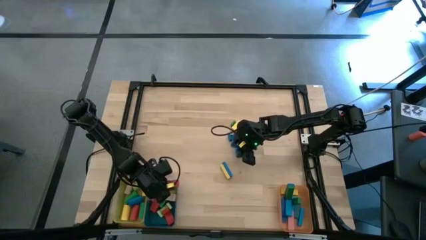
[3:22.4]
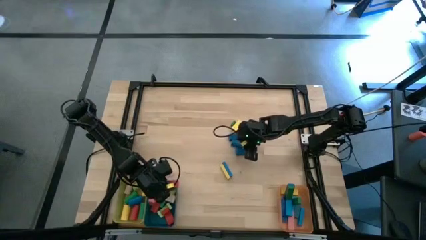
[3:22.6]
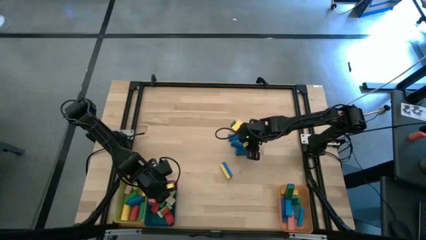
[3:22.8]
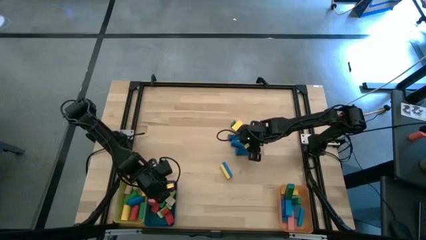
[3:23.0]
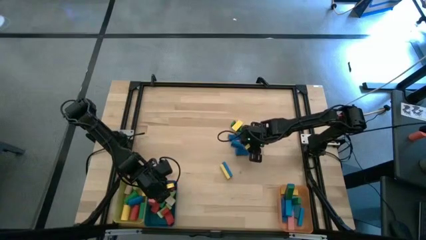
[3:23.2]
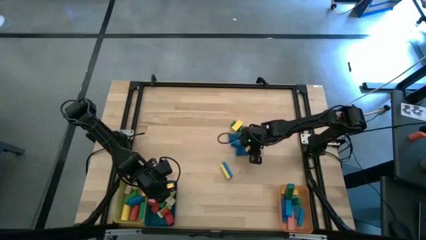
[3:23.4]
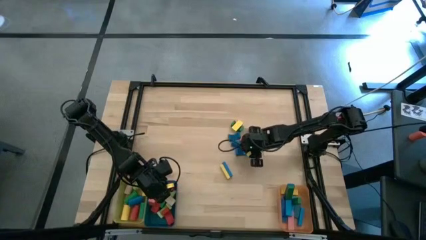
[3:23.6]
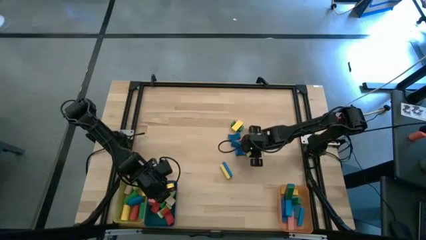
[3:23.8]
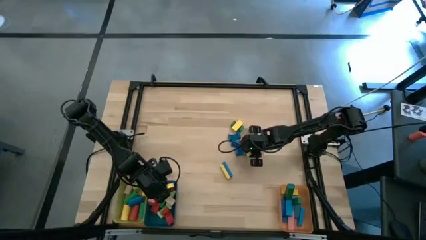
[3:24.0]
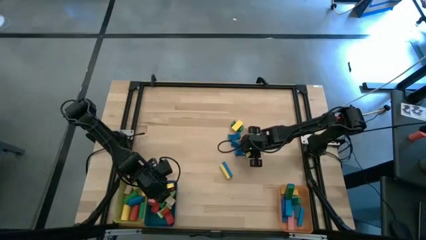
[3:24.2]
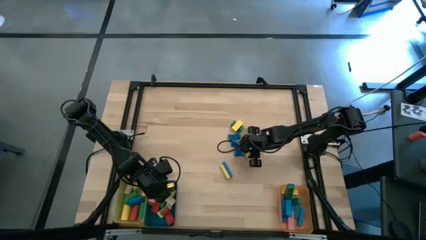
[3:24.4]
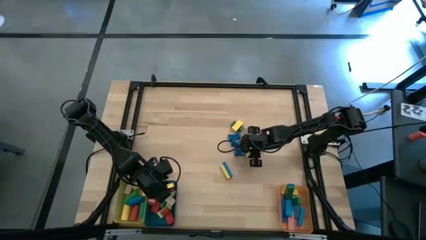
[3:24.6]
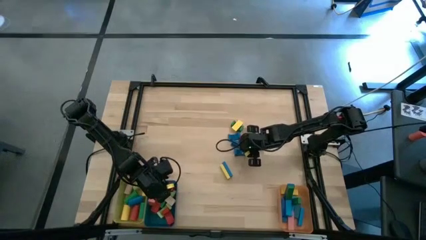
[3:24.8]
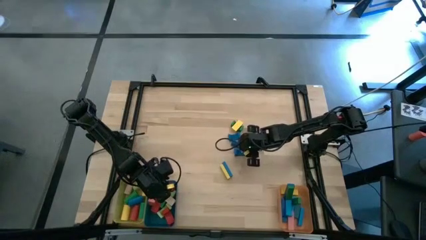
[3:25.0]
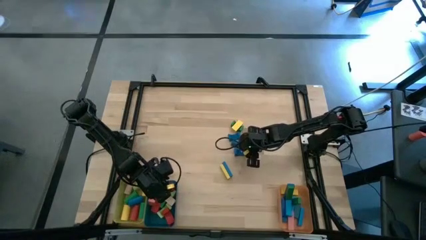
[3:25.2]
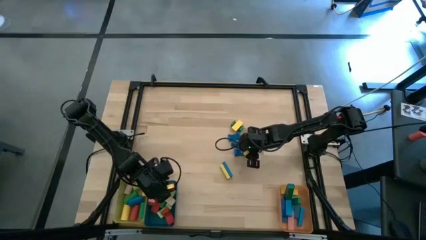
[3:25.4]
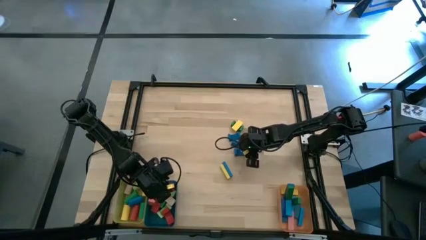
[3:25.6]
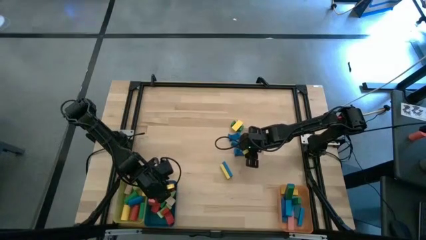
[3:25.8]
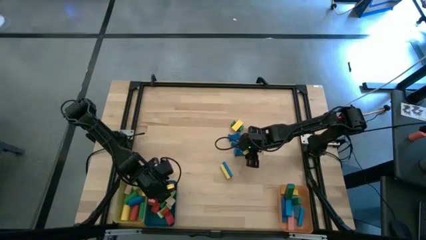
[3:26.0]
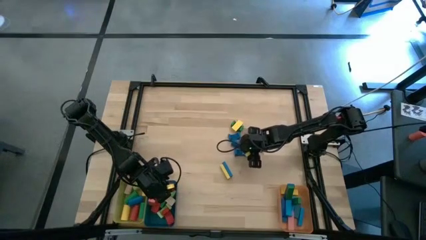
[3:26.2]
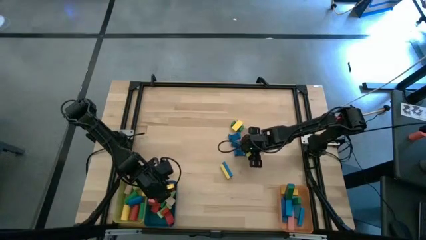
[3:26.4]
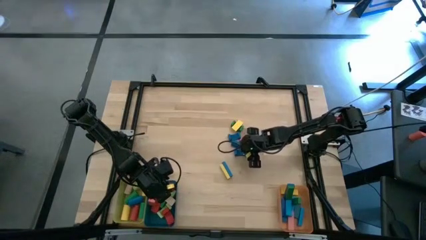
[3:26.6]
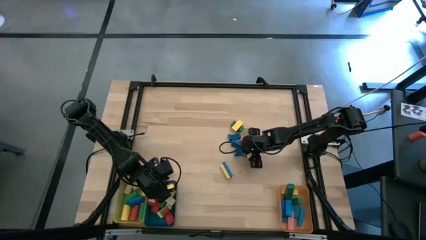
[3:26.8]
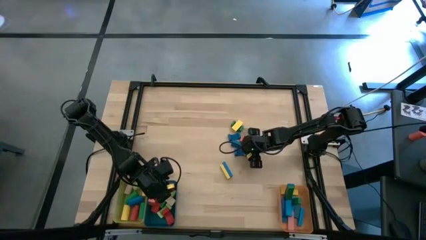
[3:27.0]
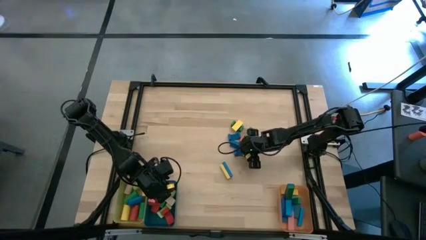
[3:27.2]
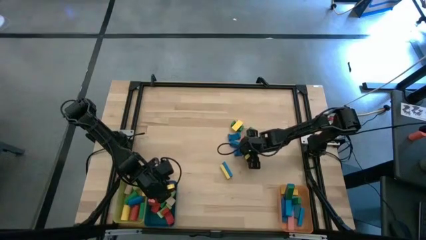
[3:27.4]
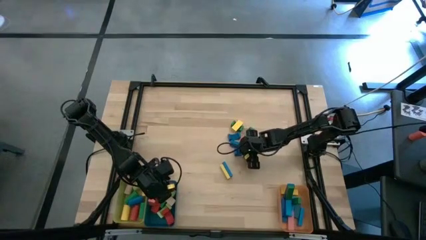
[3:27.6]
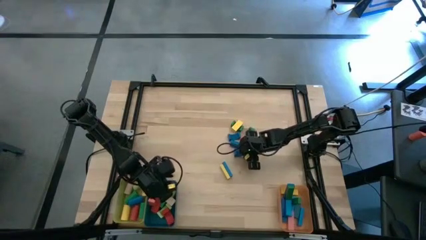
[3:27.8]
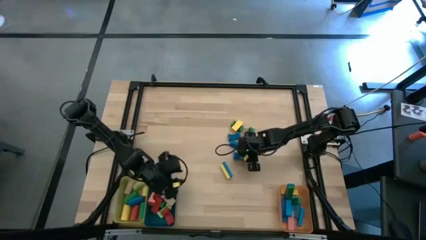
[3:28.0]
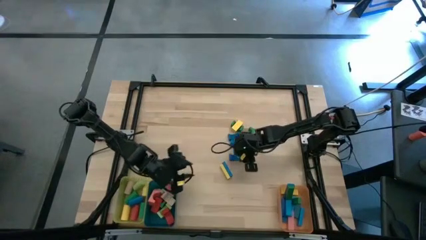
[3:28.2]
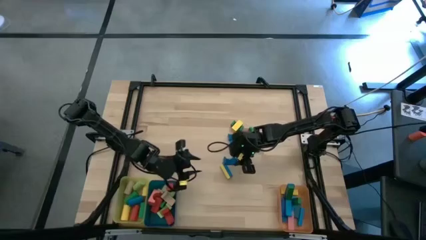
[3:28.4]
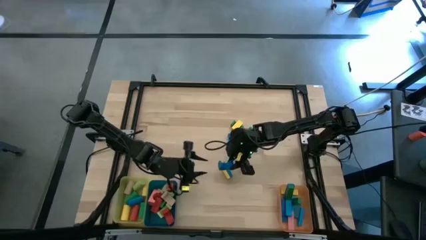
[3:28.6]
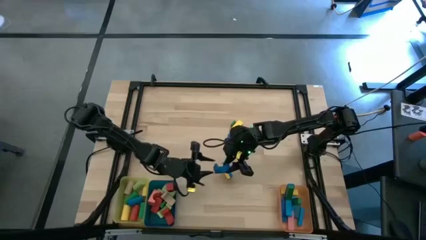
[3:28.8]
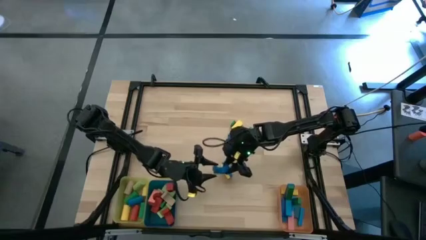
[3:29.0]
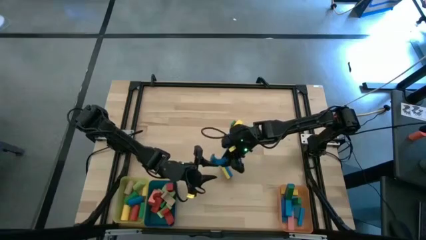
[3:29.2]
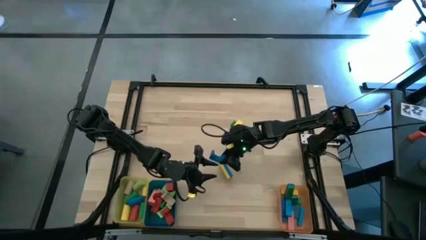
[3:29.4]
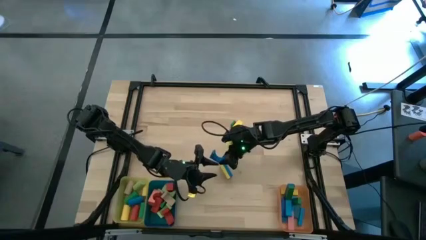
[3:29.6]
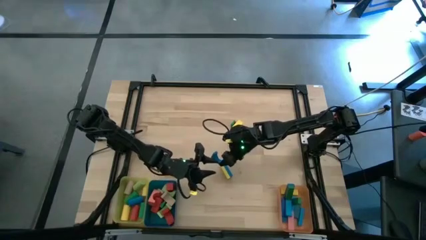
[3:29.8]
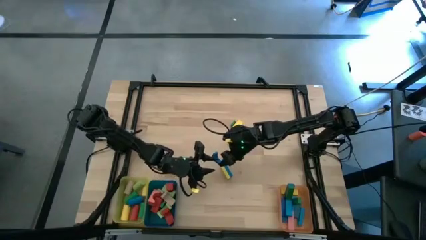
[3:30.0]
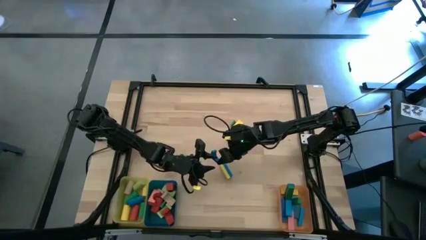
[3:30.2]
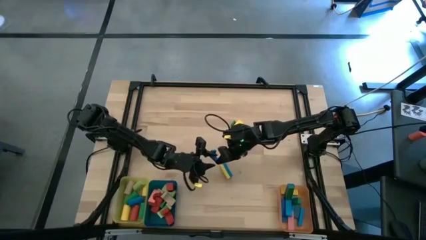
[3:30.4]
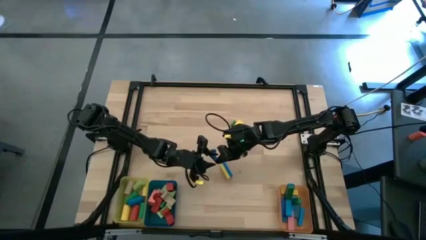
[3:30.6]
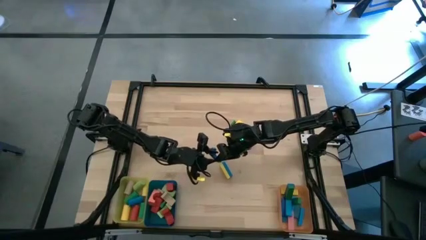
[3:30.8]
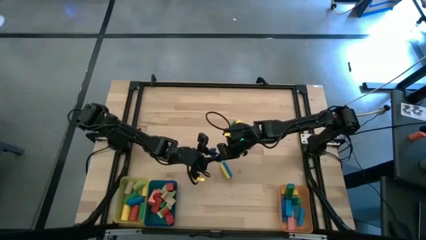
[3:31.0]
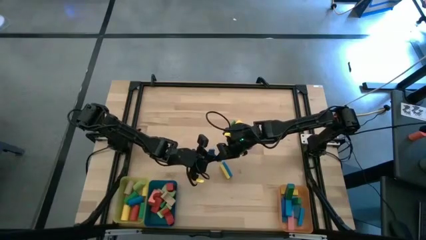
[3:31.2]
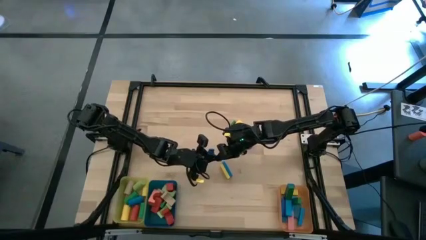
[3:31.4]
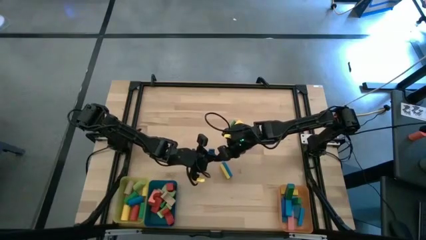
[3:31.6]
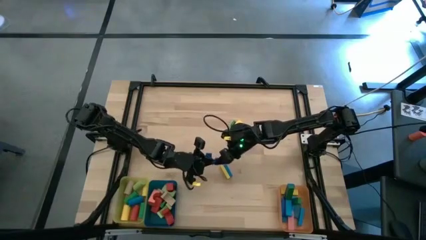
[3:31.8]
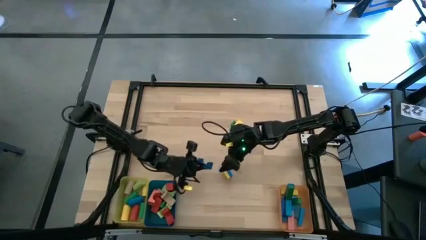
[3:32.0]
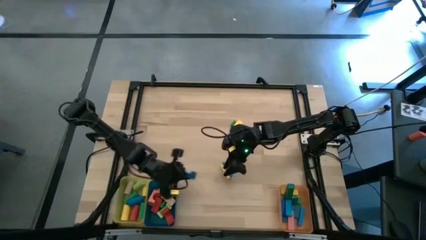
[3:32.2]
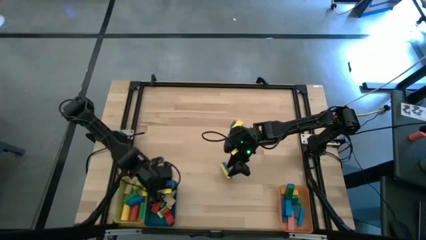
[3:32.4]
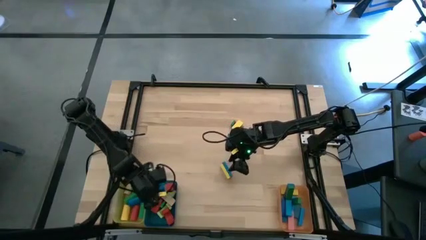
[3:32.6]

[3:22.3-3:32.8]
Task: Sort blocks by size
Put the blue arch block into the blue bin

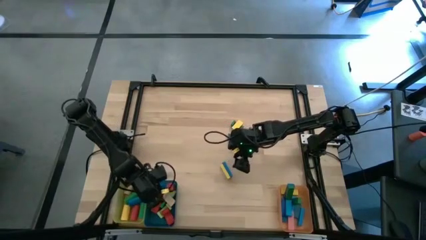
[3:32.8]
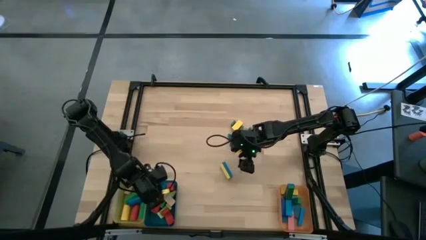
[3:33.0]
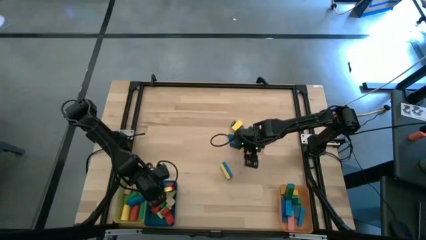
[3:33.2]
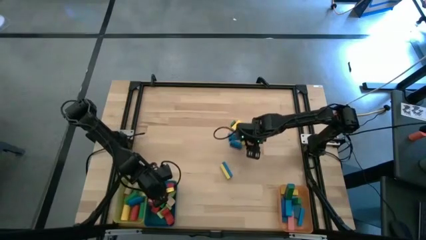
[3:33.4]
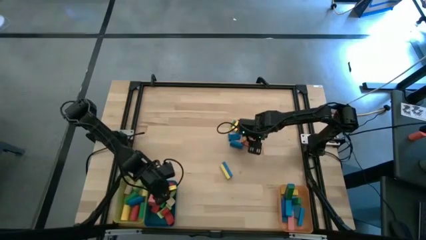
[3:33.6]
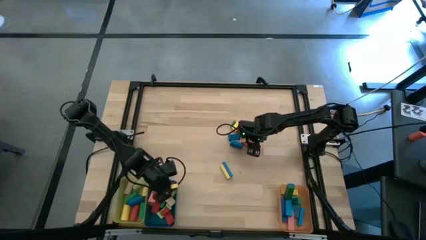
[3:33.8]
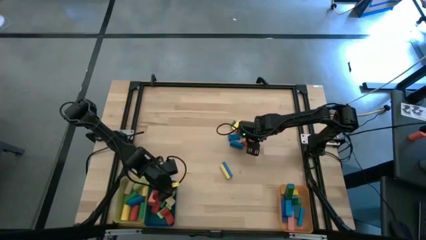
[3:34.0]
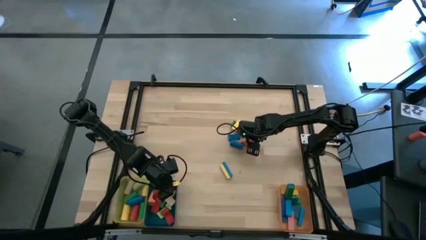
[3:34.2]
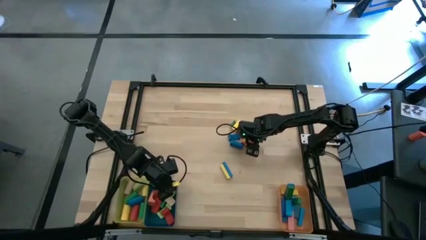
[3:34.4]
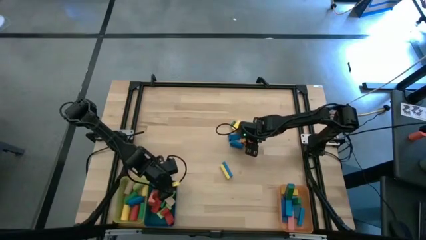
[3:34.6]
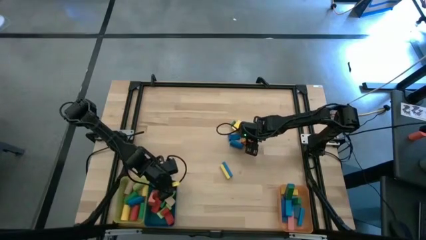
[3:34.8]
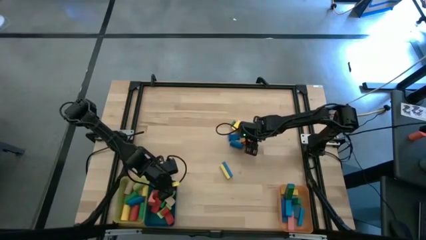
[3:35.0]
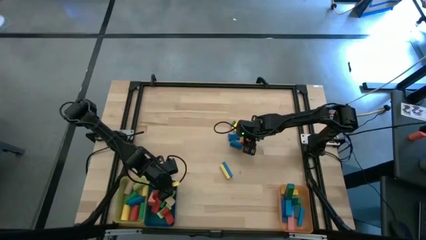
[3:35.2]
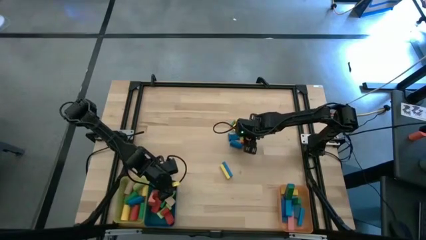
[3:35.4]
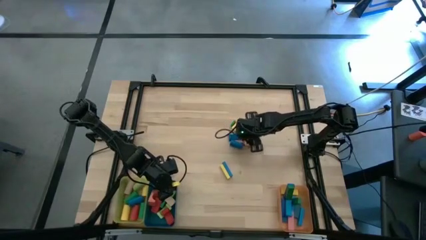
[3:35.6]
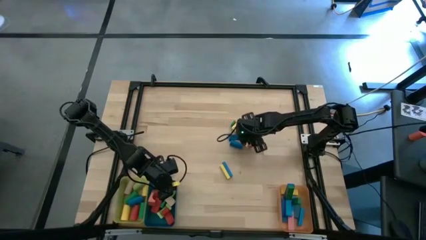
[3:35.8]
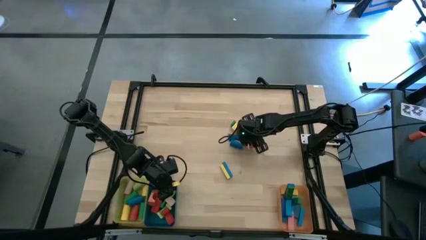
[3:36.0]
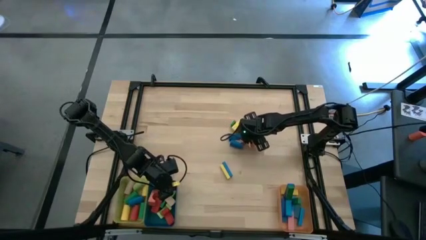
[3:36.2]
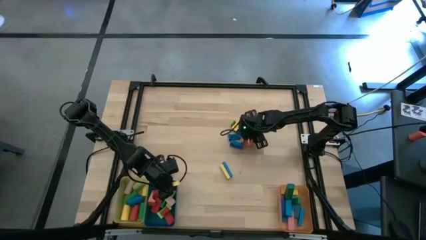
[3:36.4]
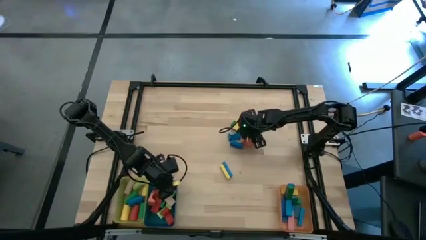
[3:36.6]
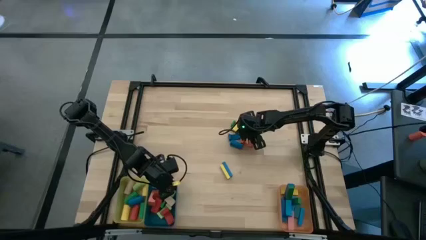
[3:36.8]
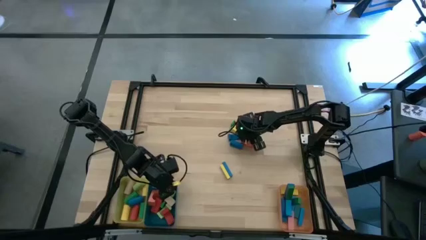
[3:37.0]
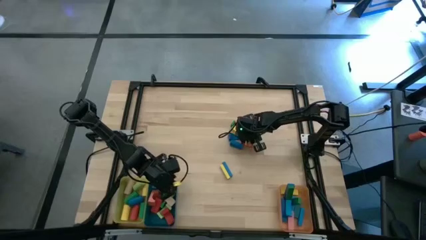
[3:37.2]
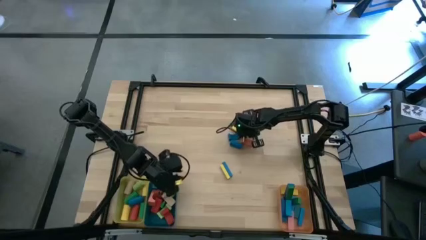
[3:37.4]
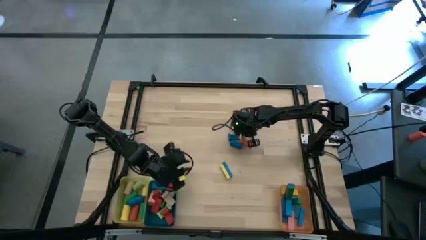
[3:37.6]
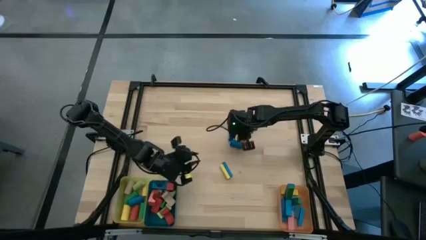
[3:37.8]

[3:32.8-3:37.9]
Put the green arch block into the blue bin

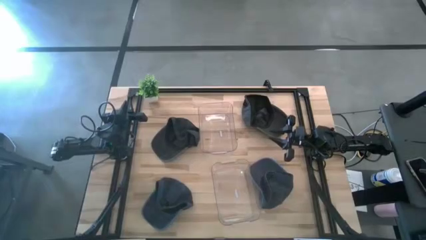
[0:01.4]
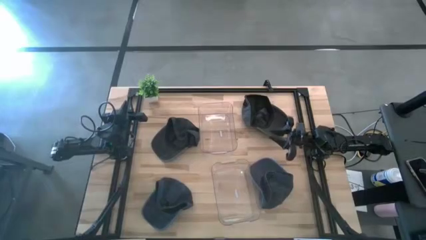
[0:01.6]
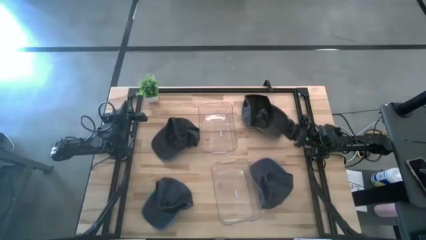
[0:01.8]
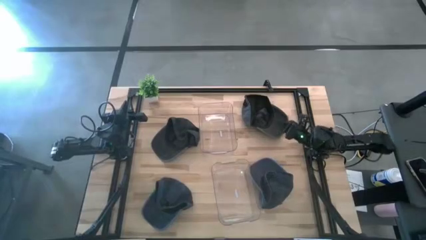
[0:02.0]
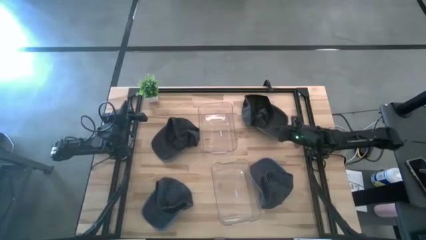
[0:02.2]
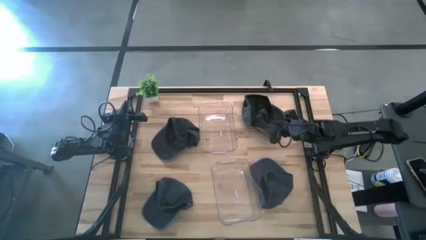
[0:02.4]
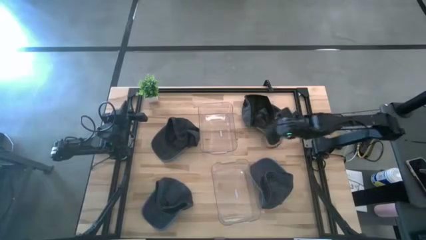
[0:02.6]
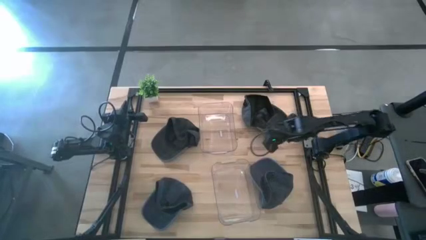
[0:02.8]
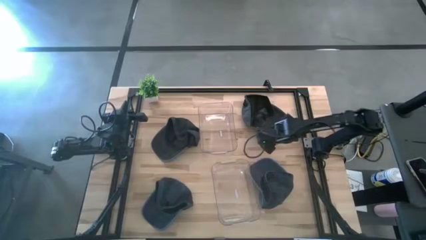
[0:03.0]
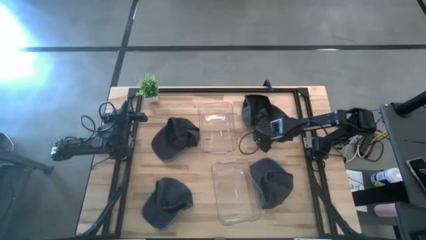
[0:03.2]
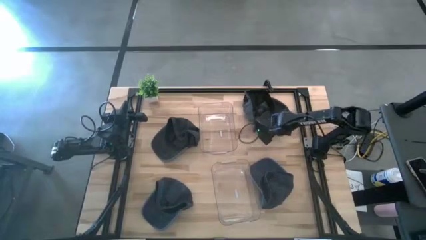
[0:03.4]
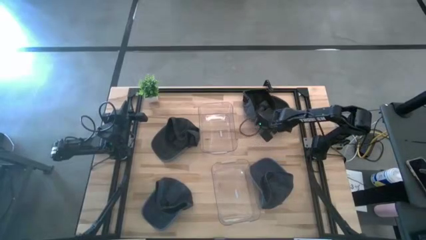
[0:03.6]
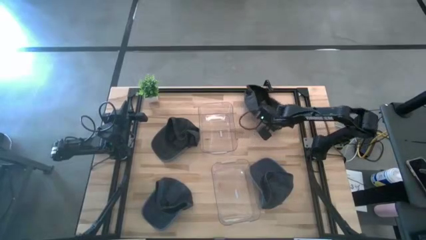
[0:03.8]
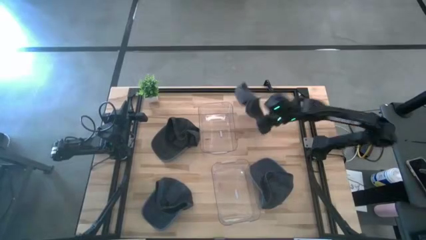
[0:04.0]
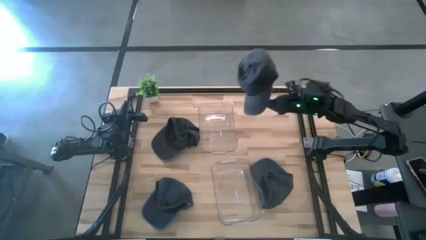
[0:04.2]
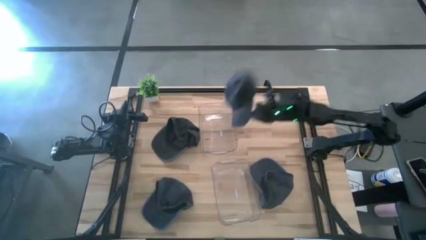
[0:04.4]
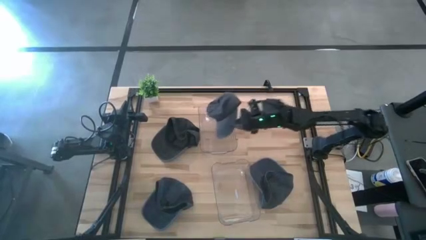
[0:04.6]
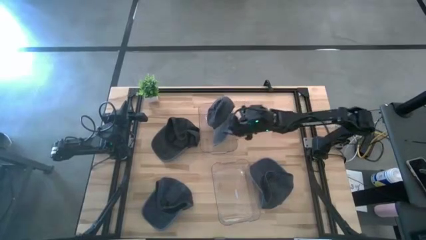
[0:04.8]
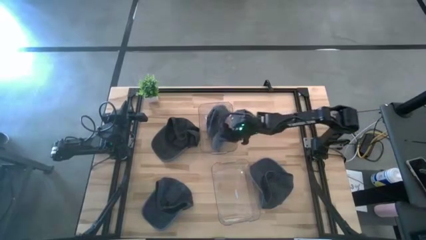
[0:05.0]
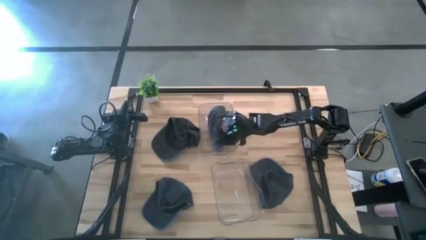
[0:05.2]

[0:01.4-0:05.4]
Task: Pick & Place hat
Put the right black cap into the top transparent bin
